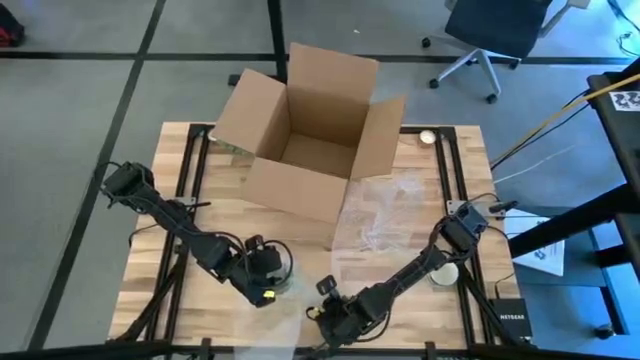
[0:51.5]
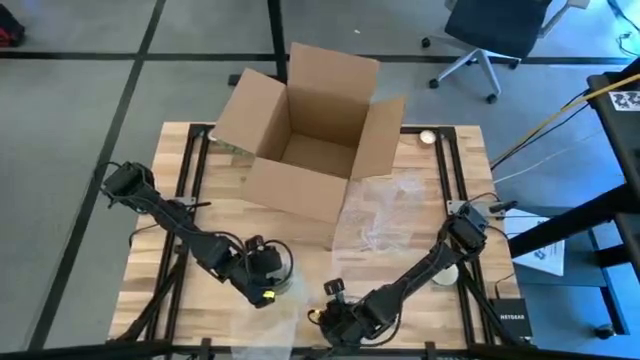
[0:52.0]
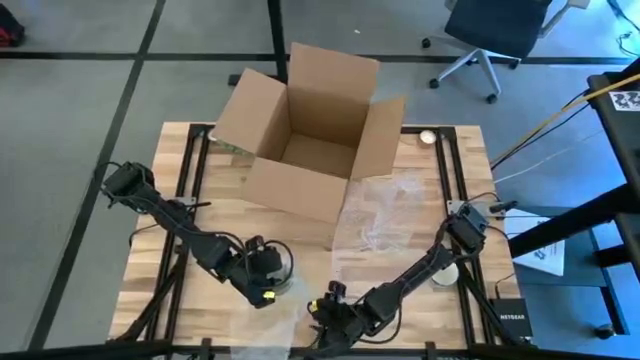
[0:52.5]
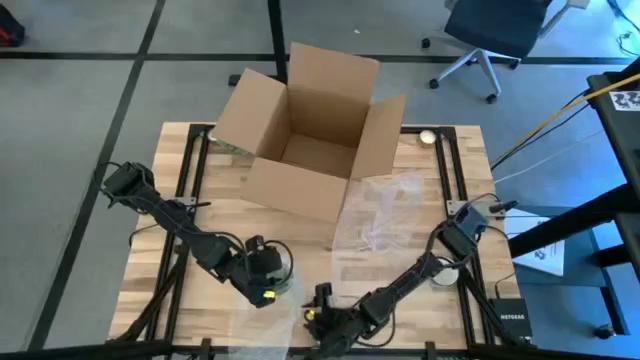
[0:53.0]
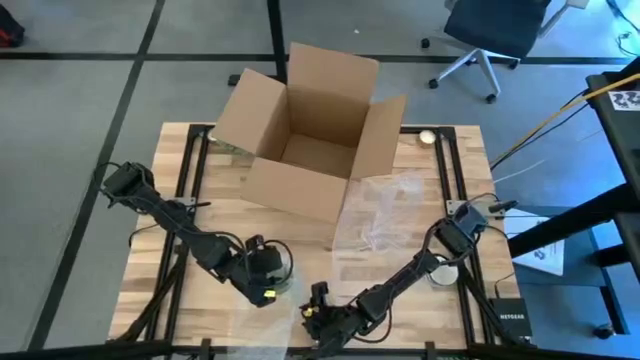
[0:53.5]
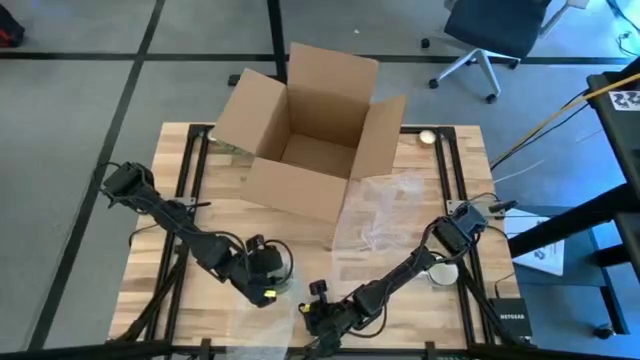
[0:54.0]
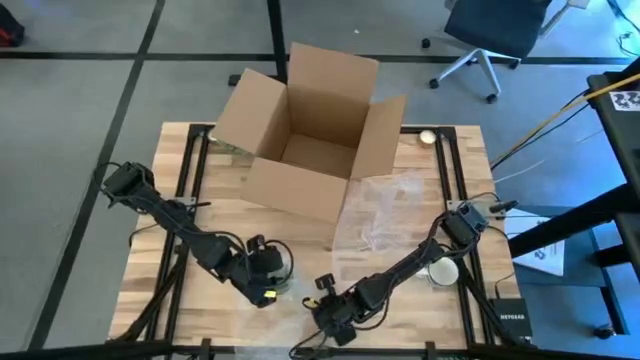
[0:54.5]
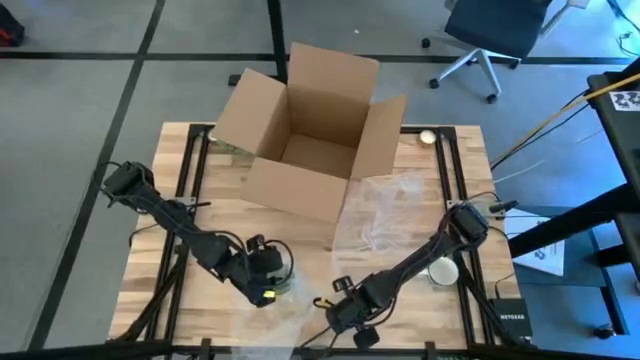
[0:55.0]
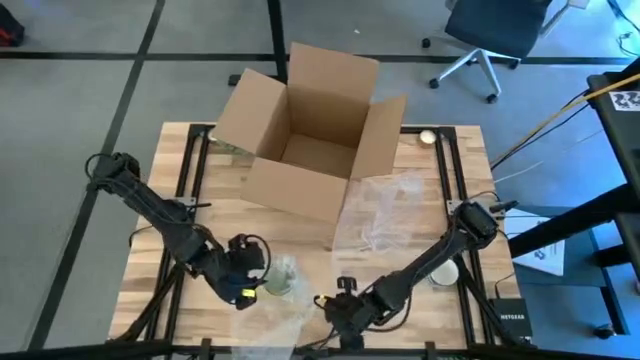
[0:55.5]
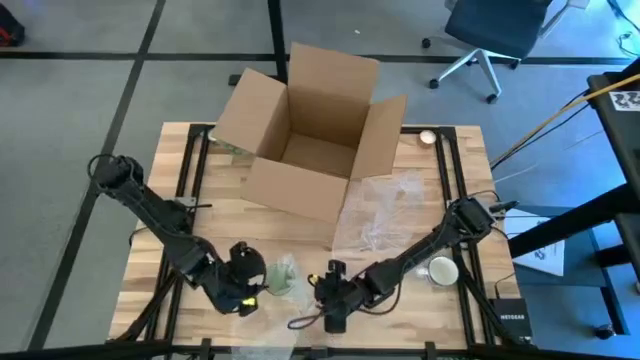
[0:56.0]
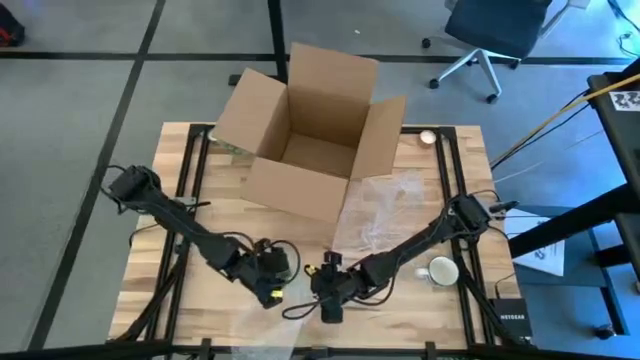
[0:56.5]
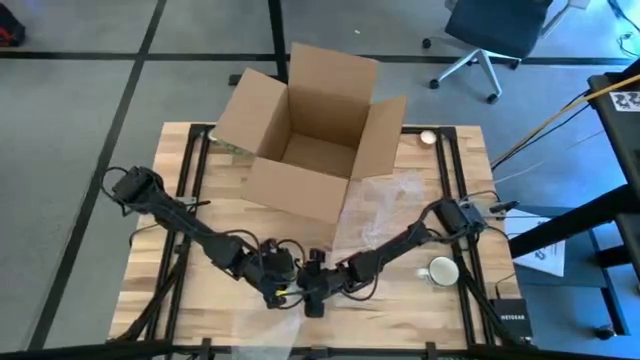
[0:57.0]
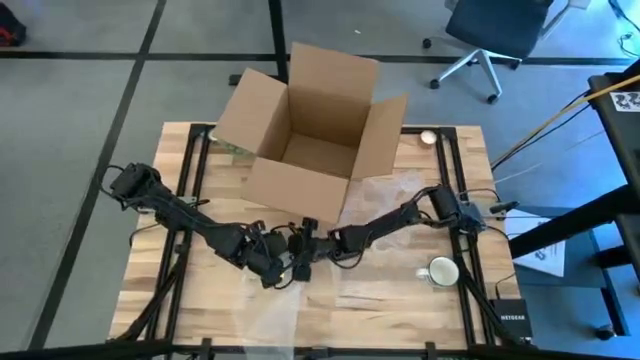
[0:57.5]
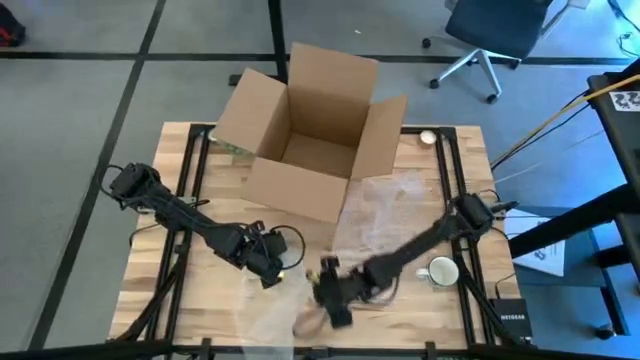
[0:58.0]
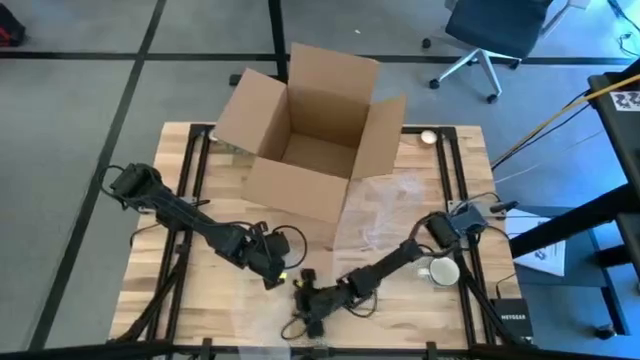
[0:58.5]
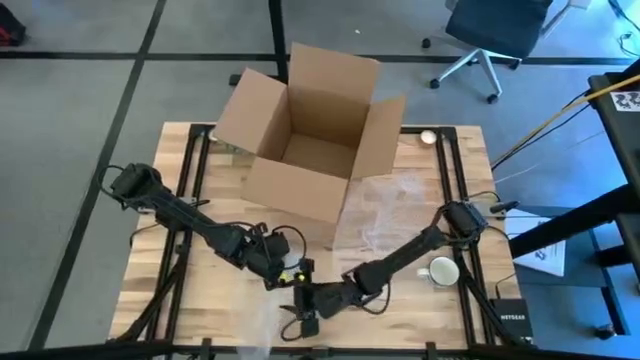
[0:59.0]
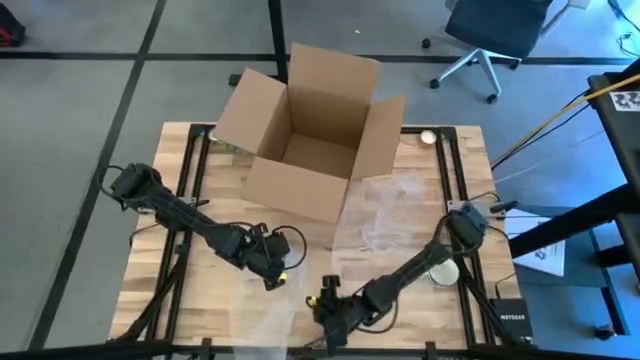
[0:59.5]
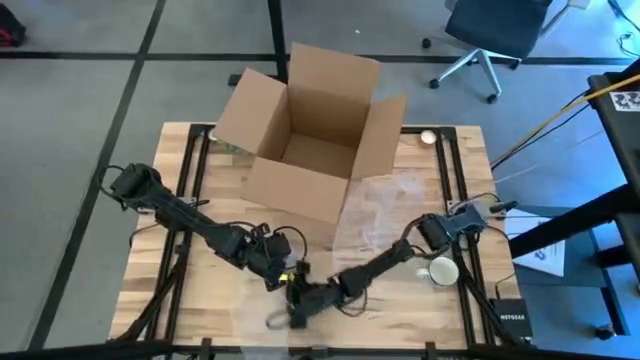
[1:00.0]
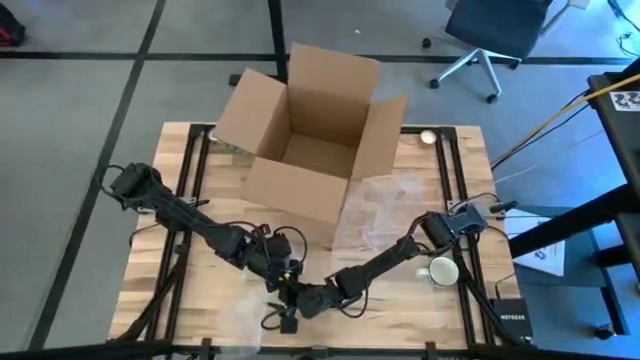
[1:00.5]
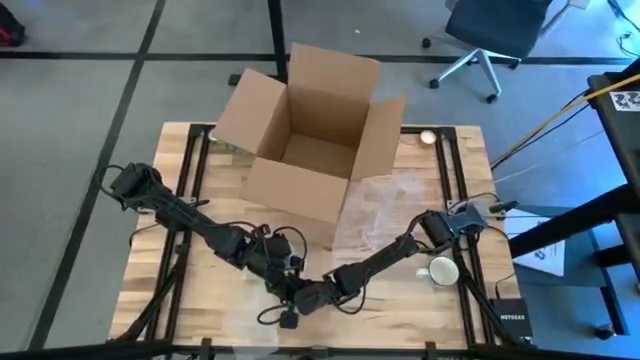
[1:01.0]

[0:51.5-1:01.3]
Task: wrap mug
Wrap the green mug with bubble wrap

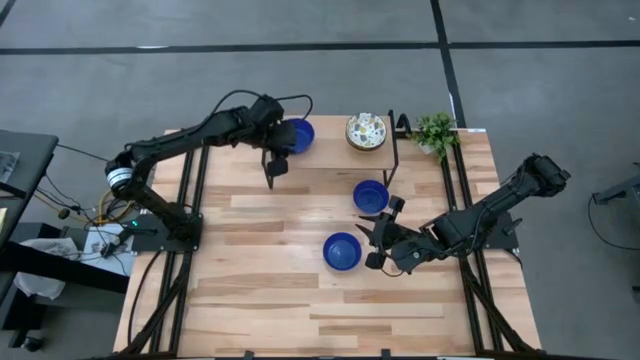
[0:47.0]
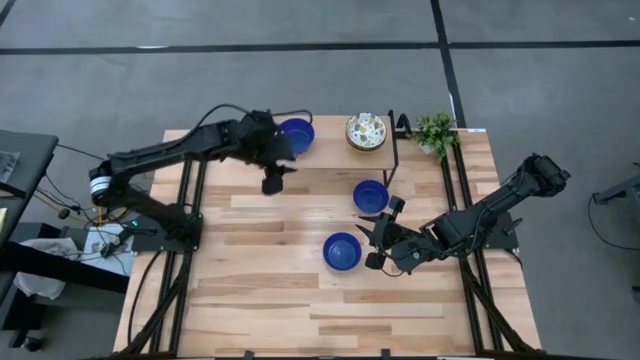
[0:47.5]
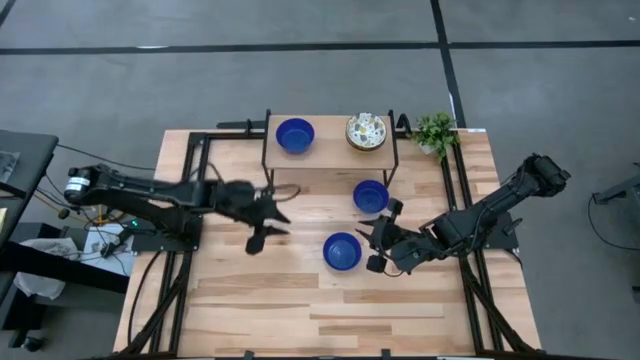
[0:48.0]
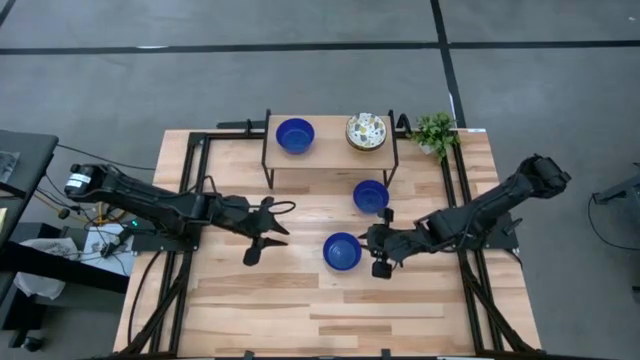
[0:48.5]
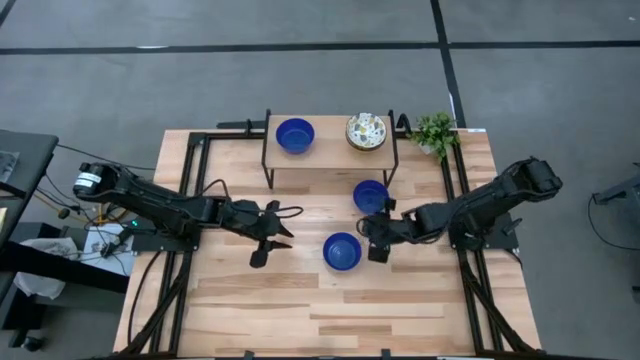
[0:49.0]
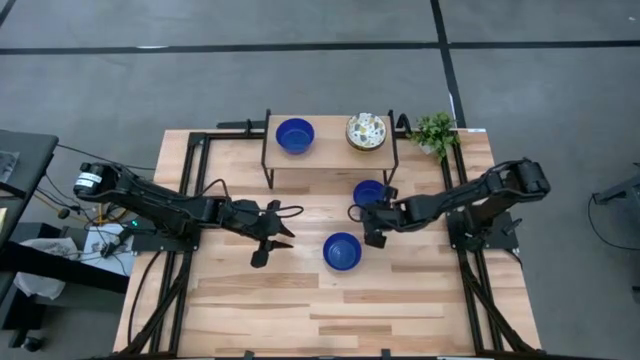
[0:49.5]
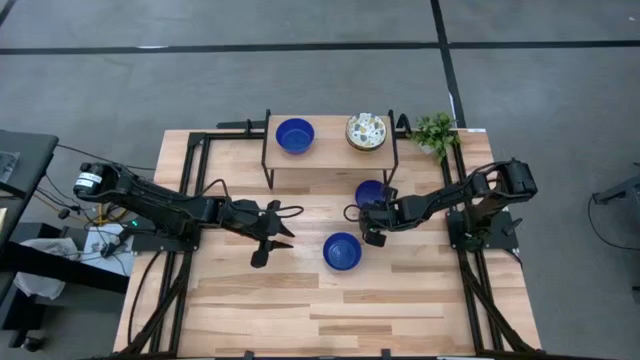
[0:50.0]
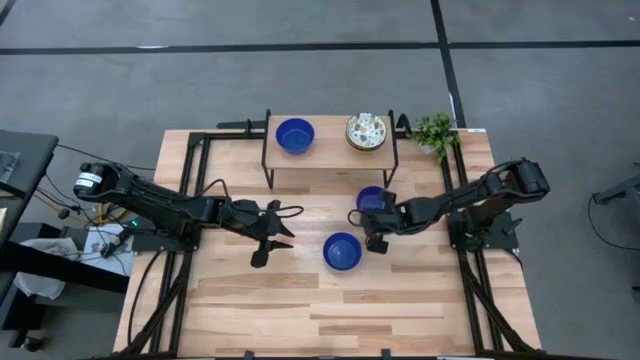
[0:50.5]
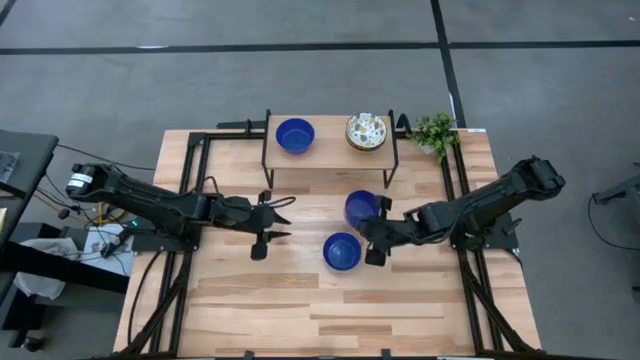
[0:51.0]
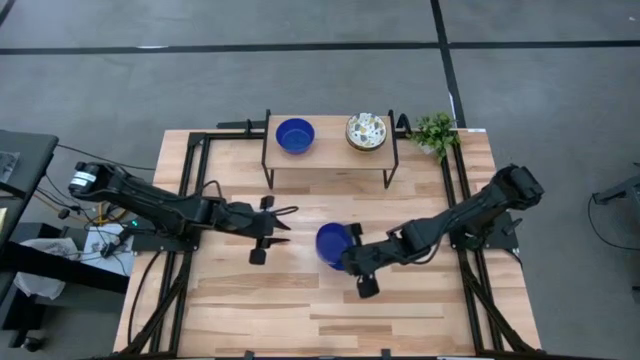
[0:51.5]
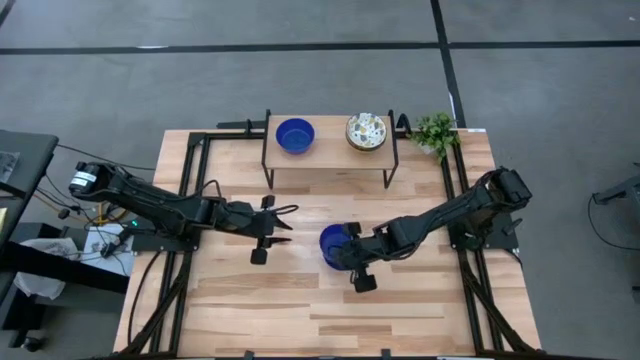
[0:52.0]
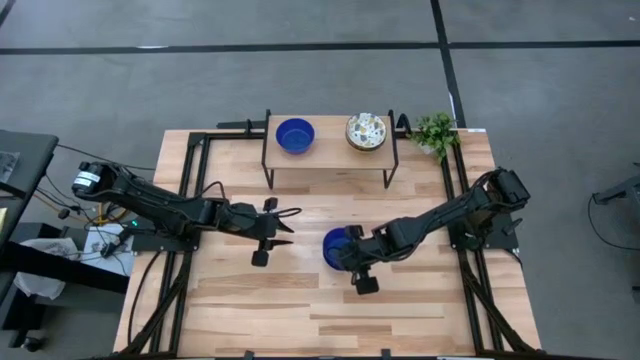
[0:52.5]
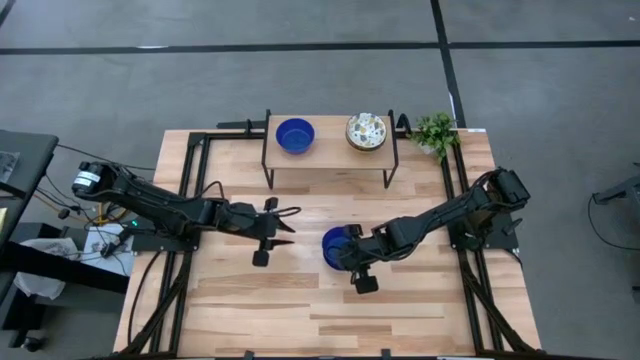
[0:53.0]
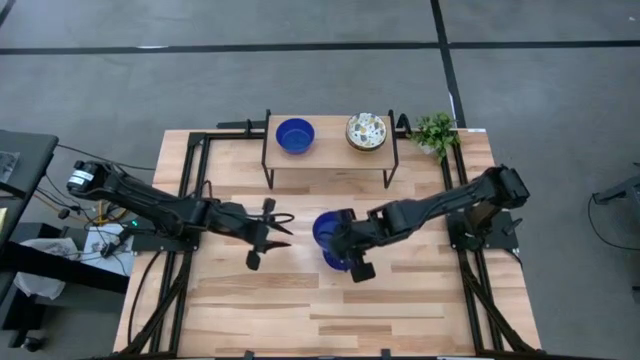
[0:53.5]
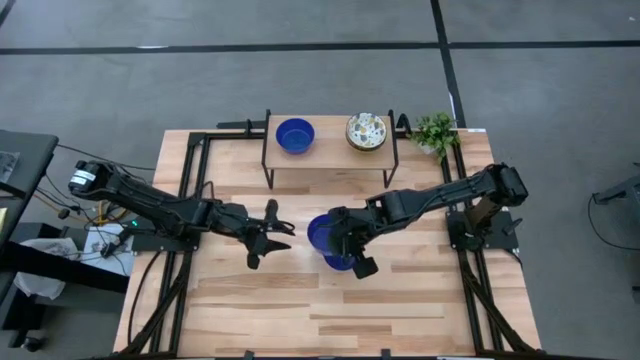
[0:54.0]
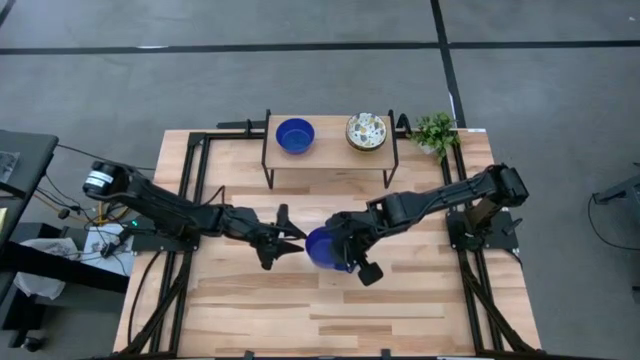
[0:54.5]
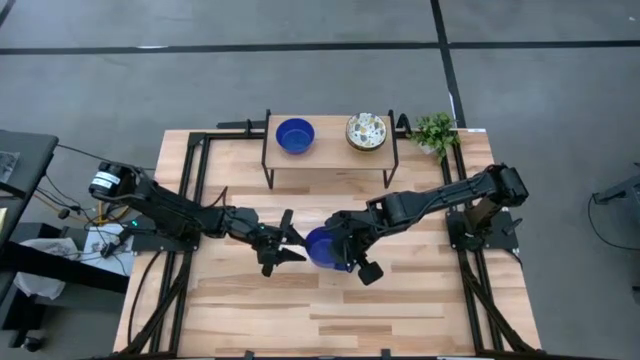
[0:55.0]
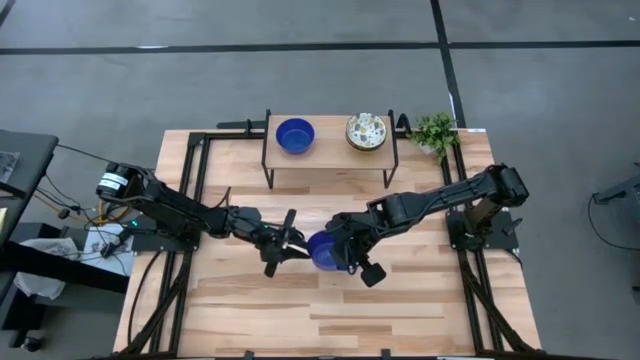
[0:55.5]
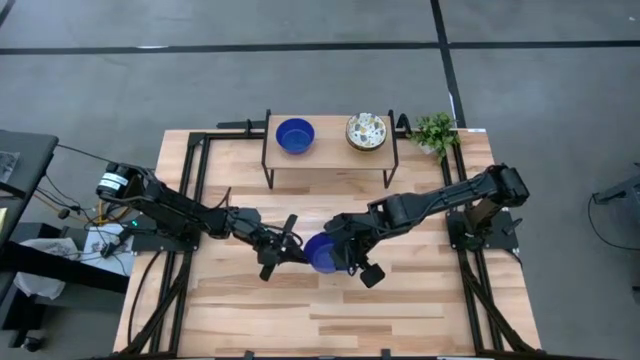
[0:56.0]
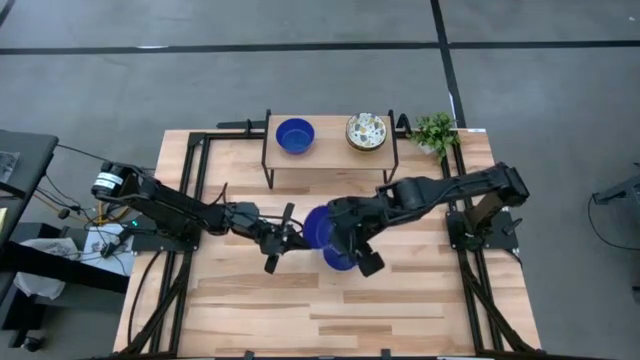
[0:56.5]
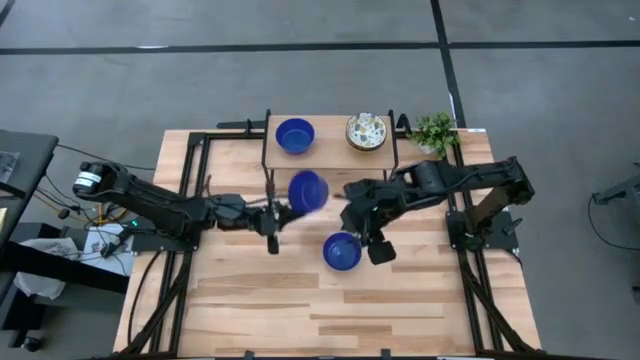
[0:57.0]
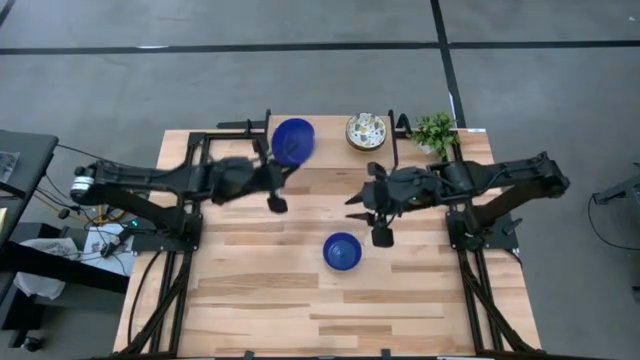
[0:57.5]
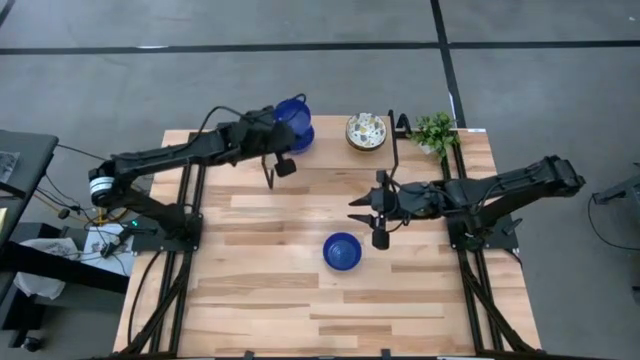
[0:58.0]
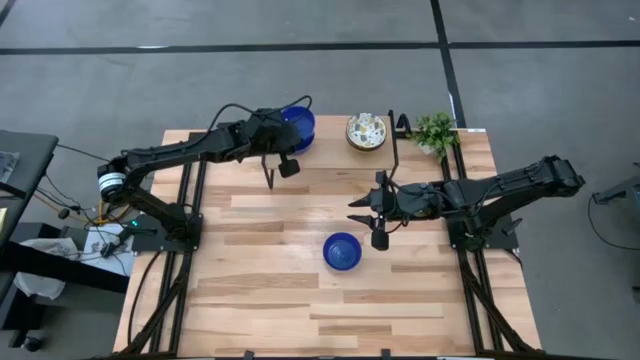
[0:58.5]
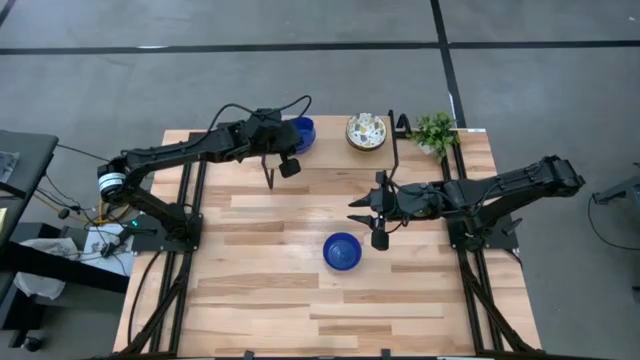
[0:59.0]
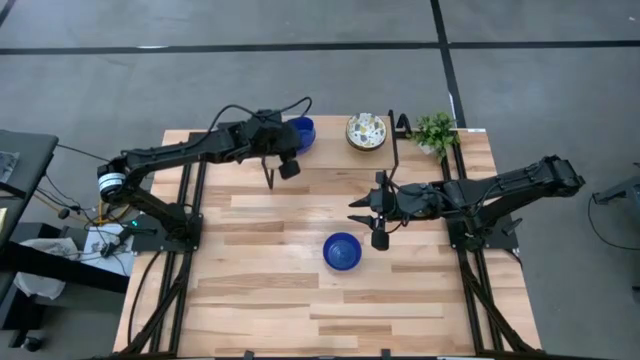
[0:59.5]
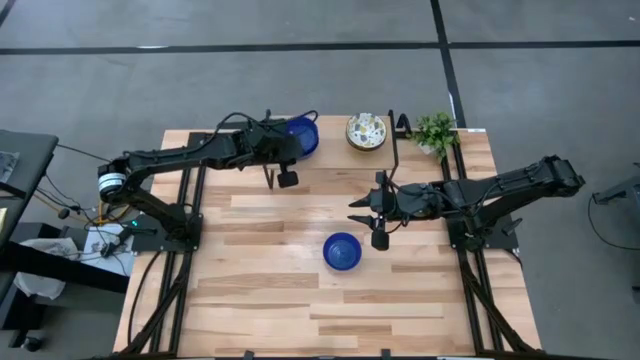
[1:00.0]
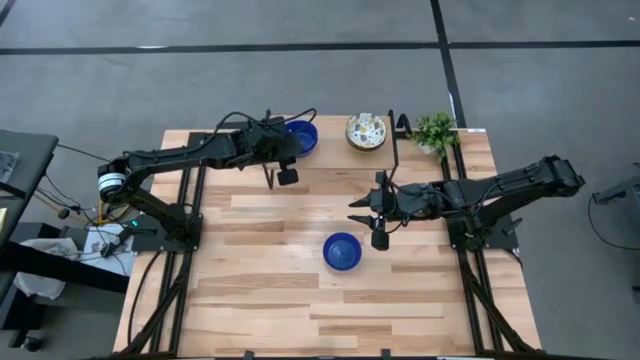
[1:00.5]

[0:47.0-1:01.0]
Task: Pick & Place Mini bowls
Stack the top blue bowl on top of the blue bowl on the shelf
